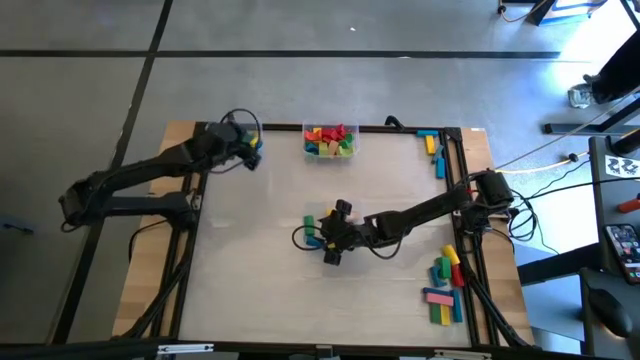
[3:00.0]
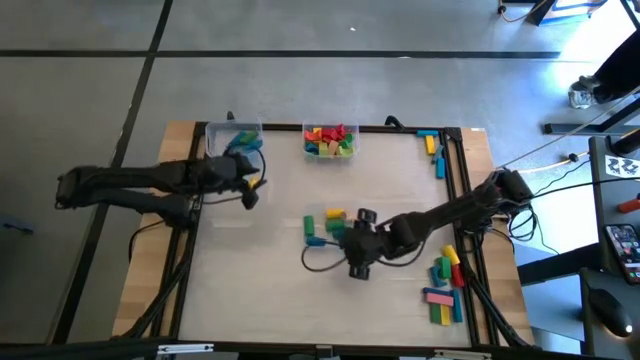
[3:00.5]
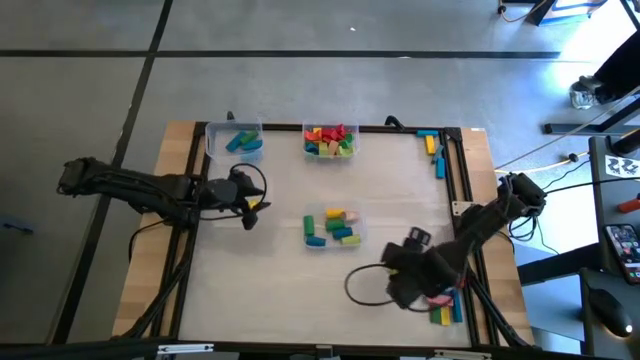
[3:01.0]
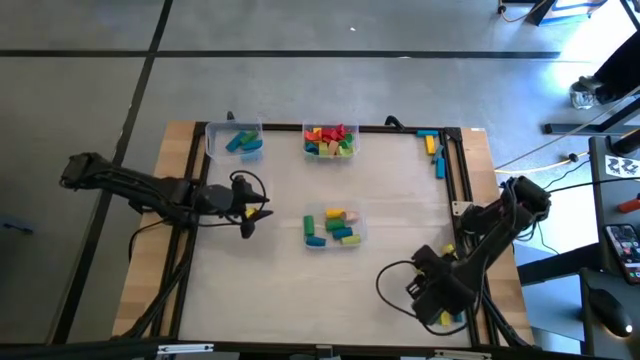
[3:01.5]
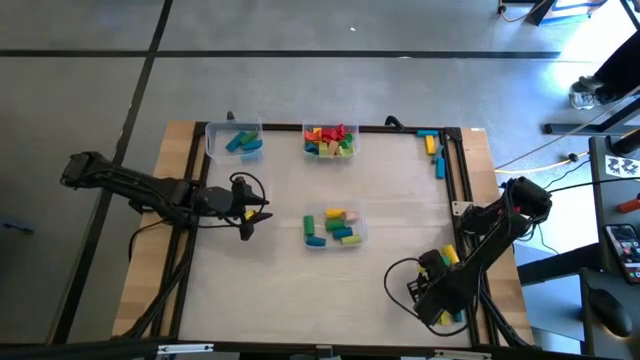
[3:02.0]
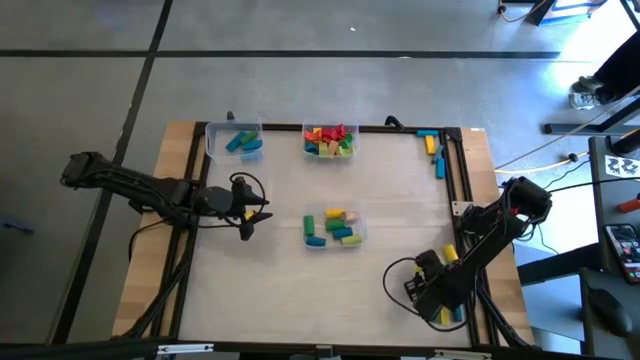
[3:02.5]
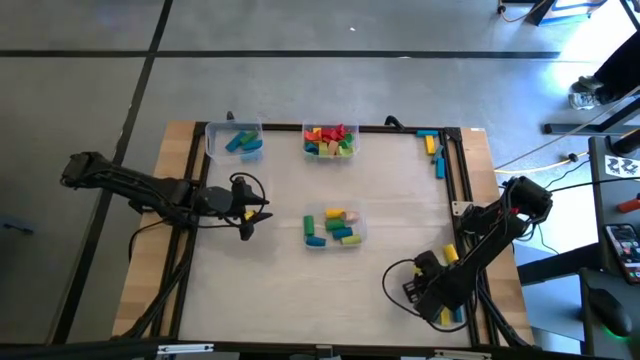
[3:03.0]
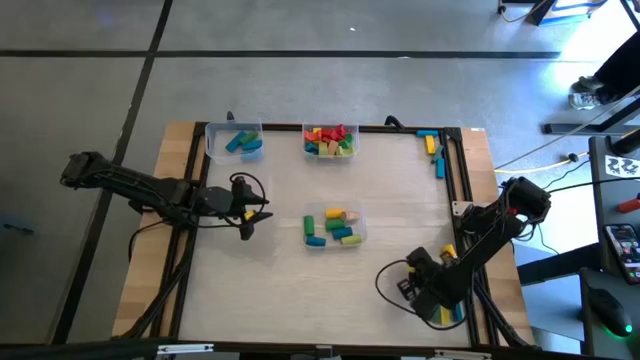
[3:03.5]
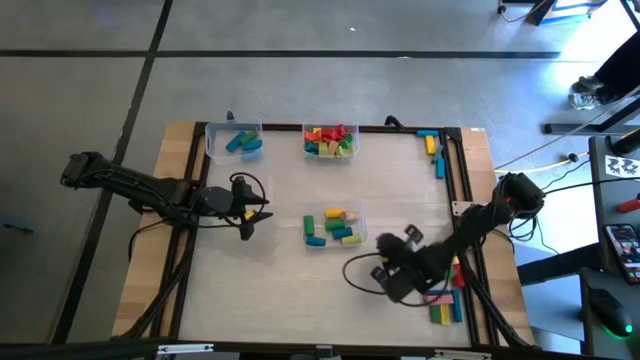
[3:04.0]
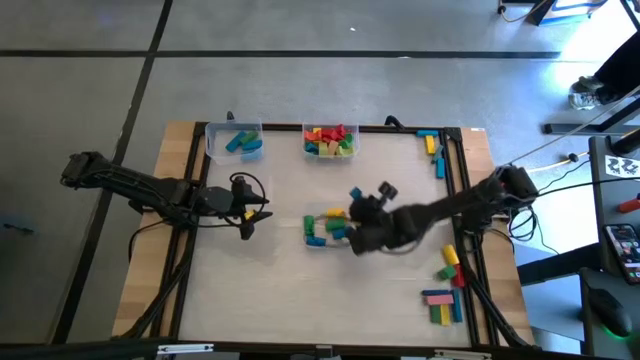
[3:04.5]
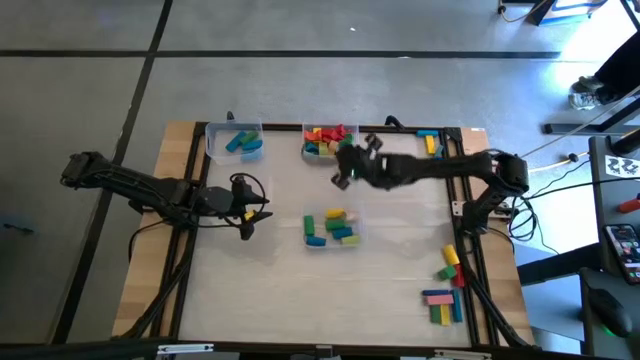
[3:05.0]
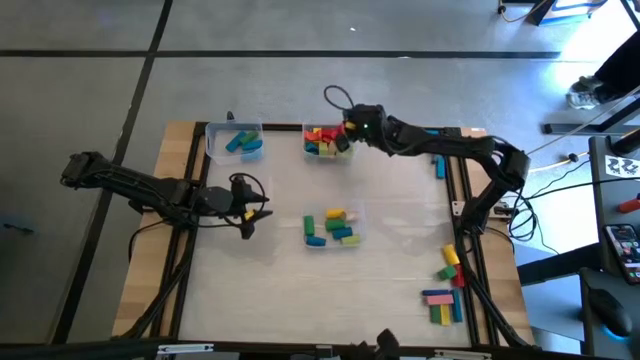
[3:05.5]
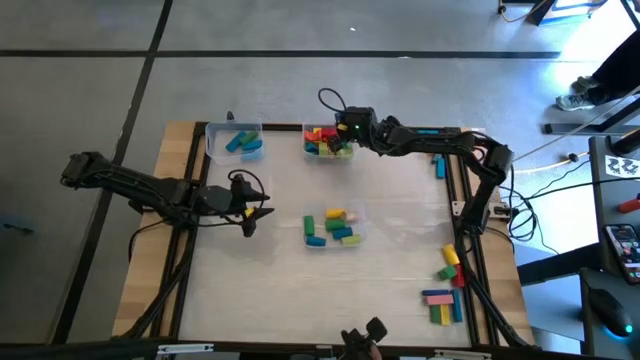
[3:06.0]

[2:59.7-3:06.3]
Task: Sort blocks by size
Put the blue arch block into the top right transparent bin

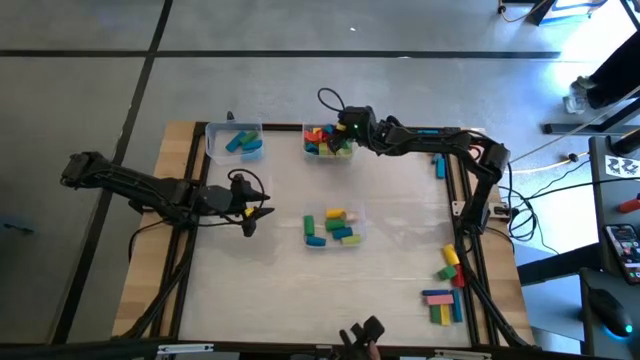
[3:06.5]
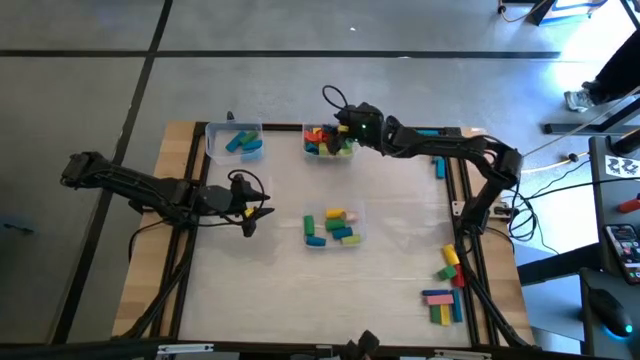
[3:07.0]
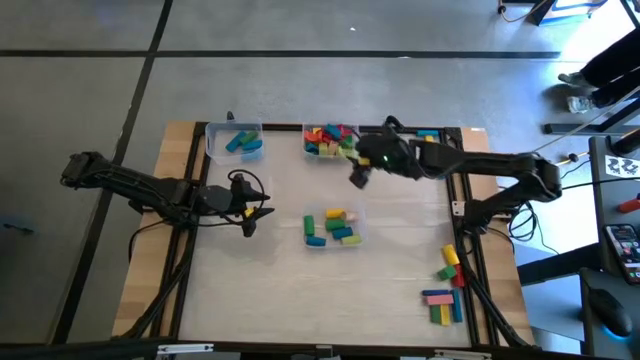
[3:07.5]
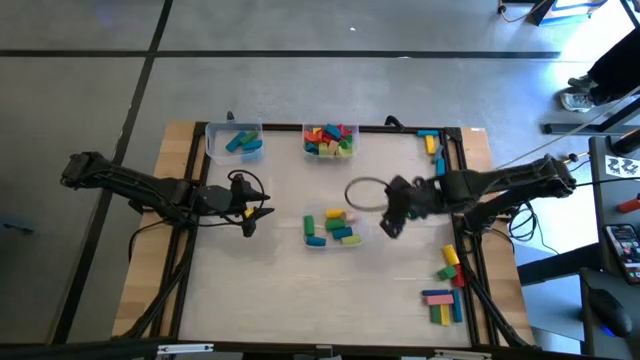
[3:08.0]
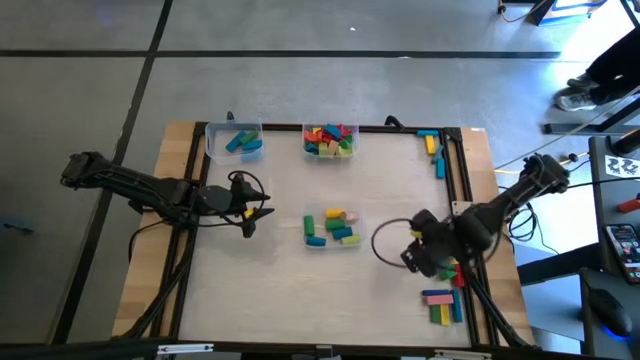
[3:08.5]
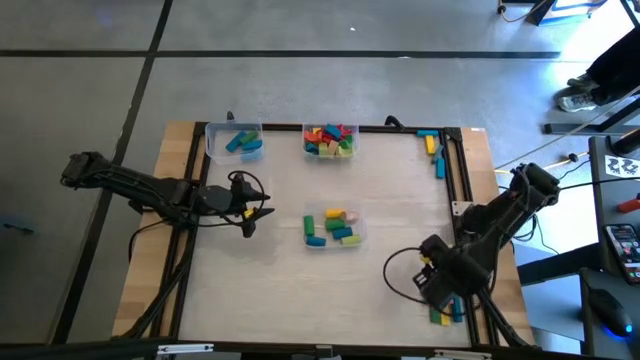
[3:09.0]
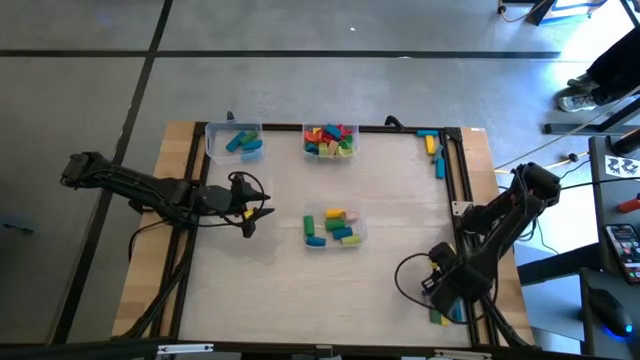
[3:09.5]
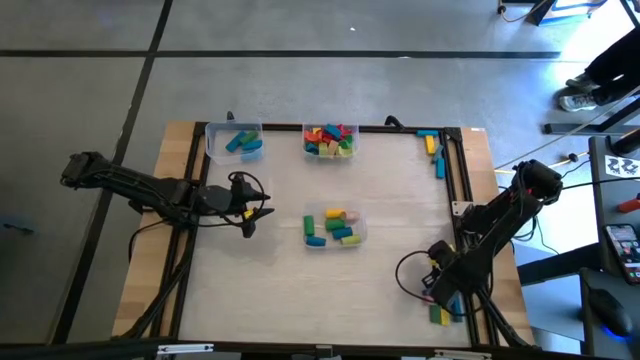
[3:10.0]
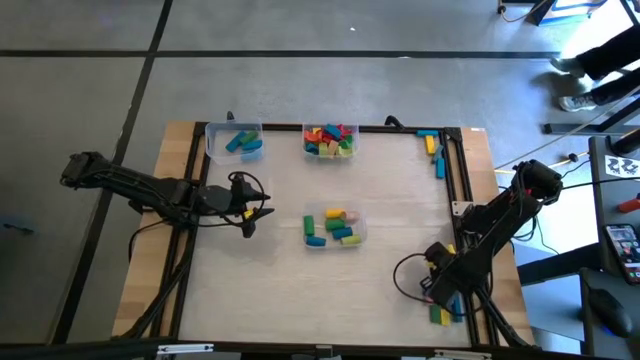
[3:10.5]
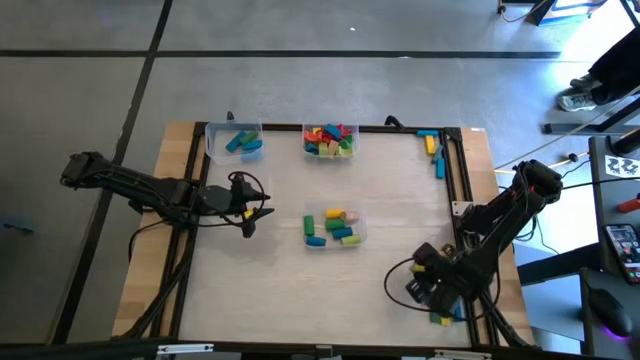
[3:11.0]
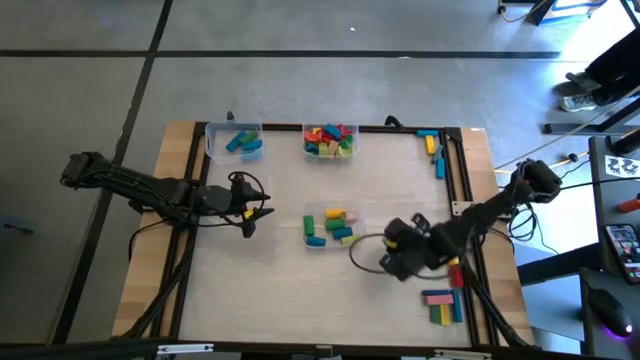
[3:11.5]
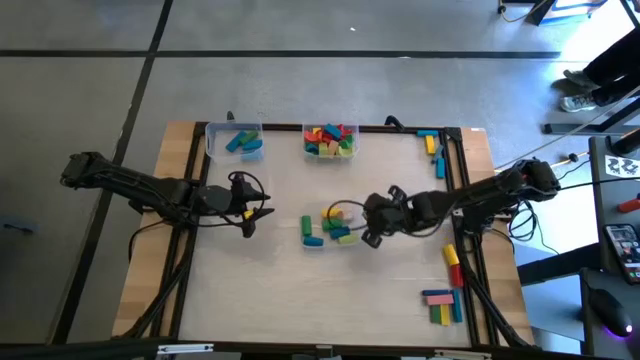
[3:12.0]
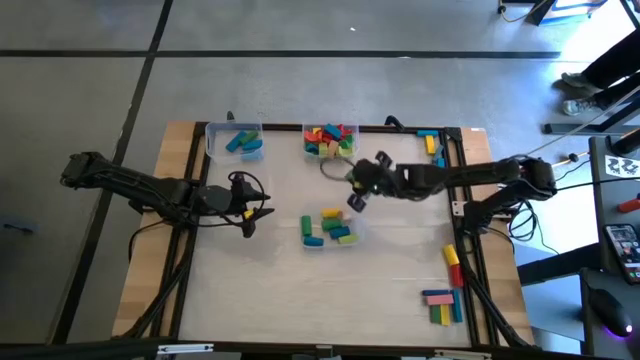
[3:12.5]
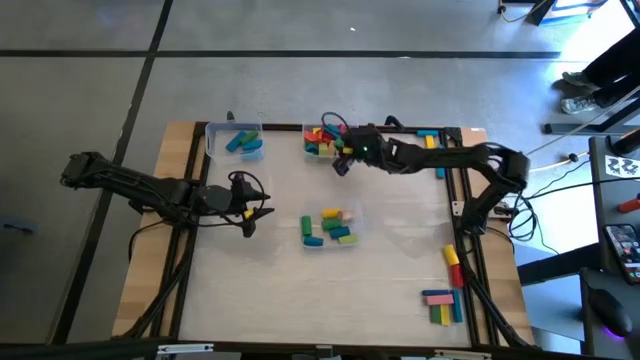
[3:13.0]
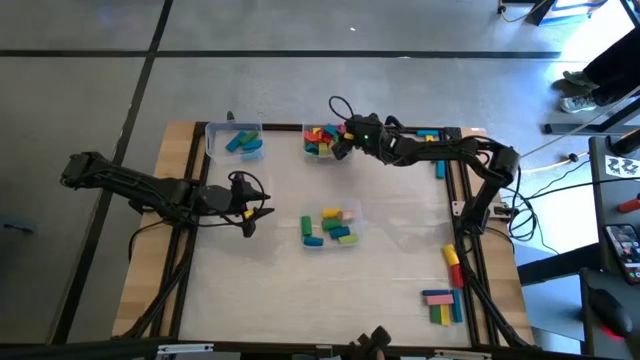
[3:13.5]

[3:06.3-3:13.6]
Put the green arch block into the top right transparent bin

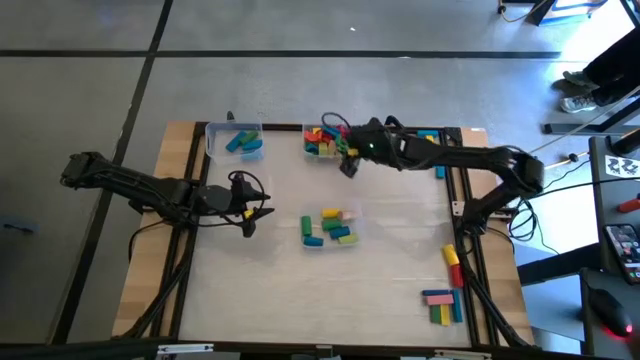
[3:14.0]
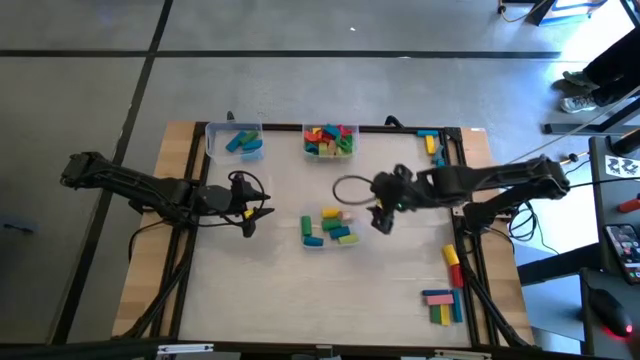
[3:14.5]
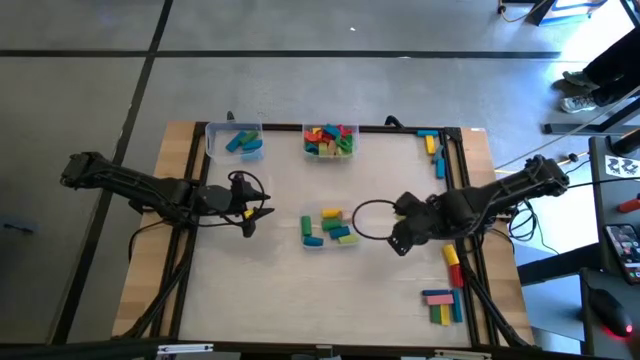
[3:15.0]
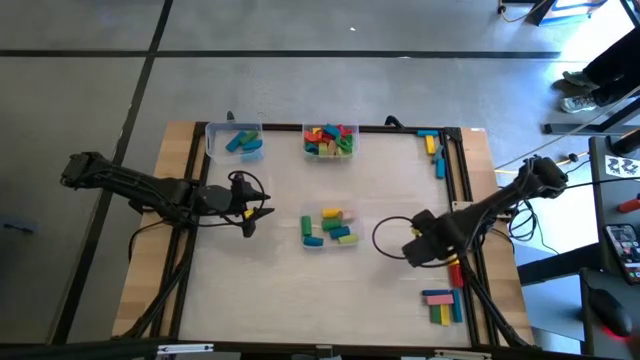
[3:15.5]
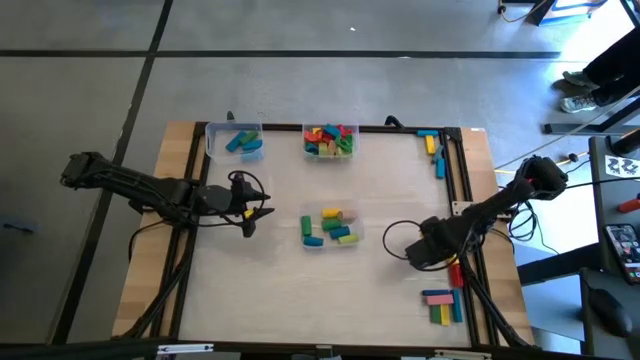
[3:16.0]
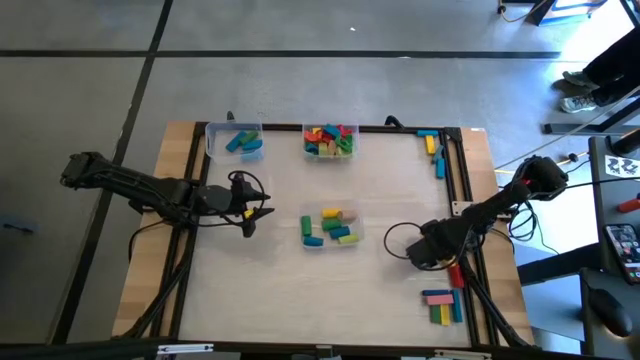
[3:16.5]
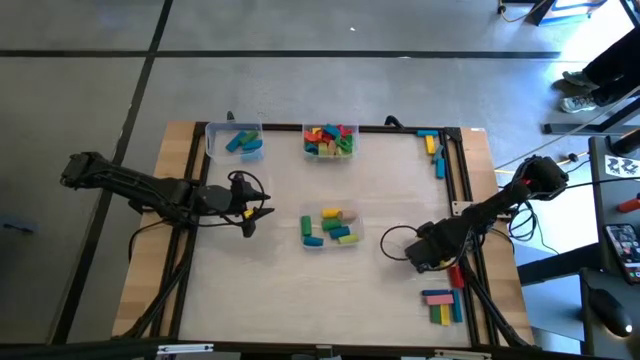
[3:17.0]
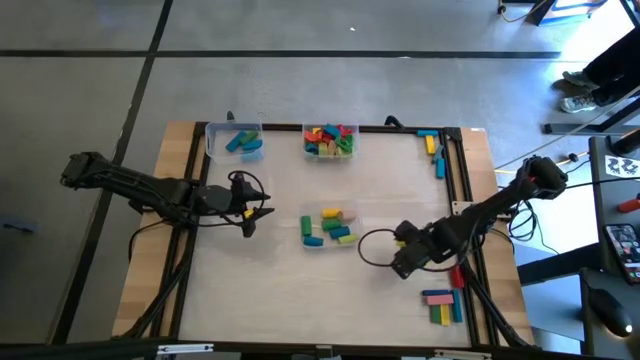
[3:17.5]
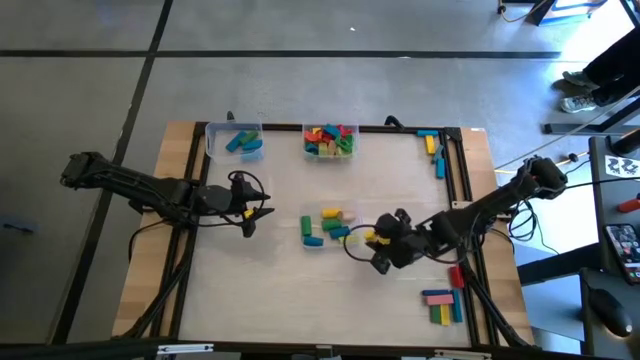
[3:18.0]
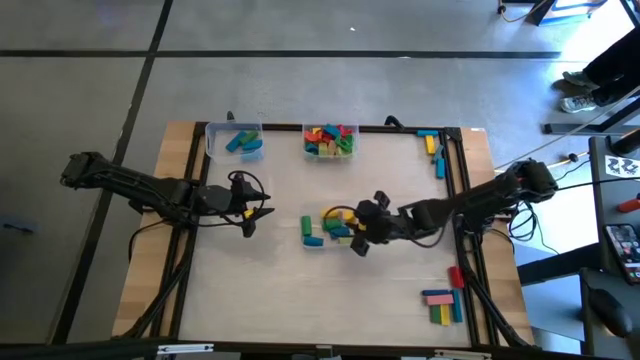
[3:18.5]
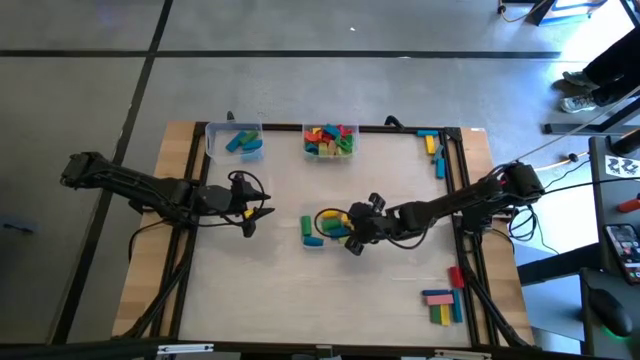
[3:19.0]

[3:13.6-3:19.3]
Put the yellow cylindrical block into the bottom transparent bin
